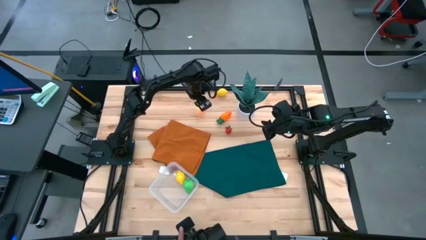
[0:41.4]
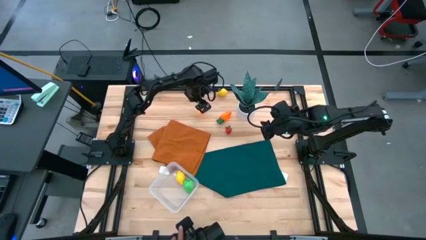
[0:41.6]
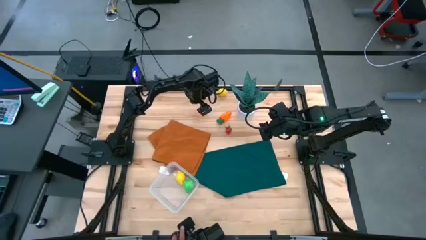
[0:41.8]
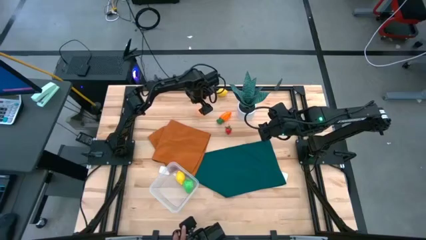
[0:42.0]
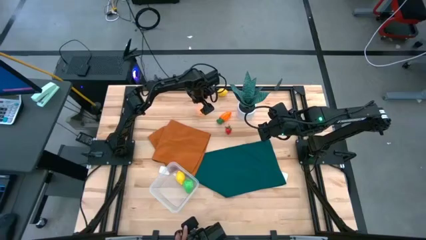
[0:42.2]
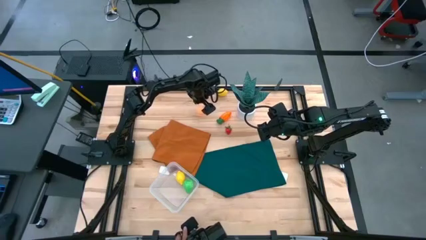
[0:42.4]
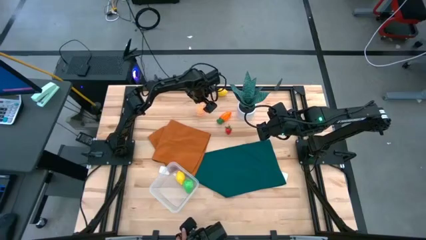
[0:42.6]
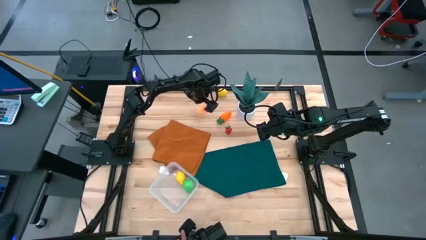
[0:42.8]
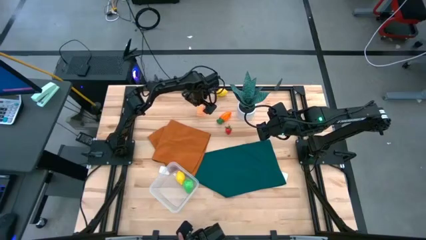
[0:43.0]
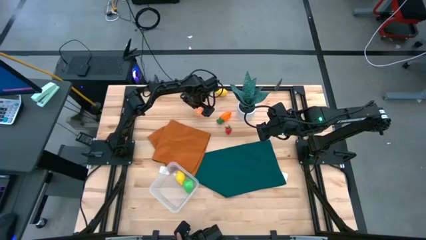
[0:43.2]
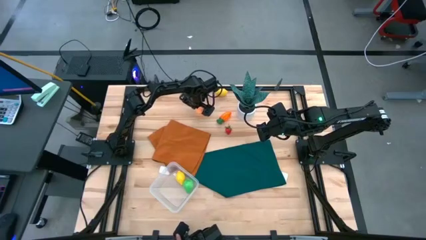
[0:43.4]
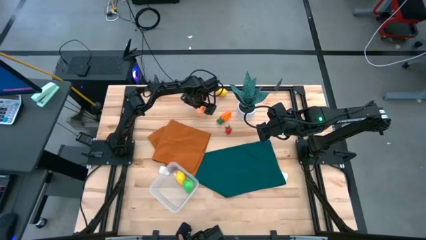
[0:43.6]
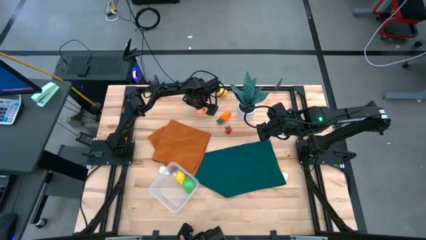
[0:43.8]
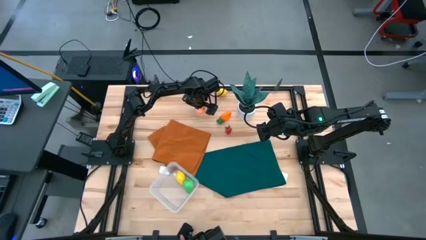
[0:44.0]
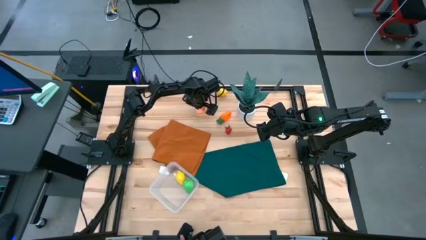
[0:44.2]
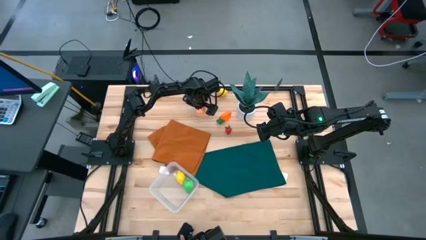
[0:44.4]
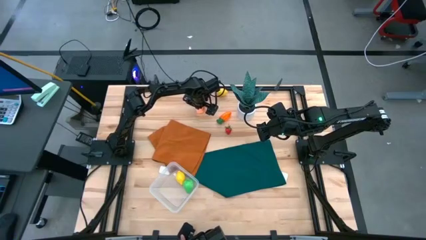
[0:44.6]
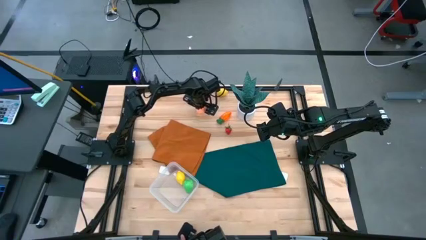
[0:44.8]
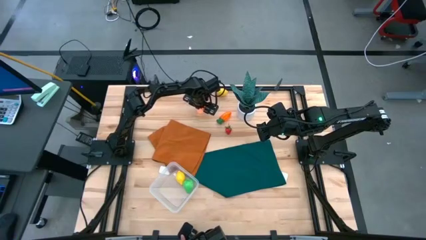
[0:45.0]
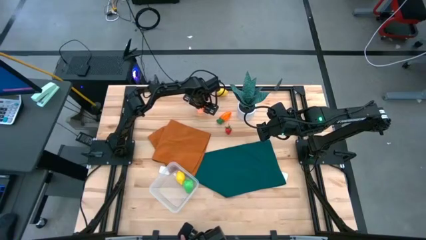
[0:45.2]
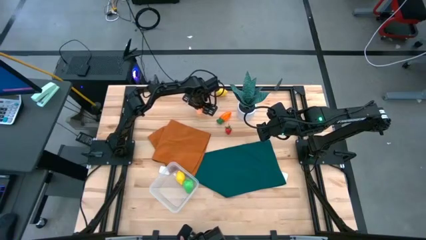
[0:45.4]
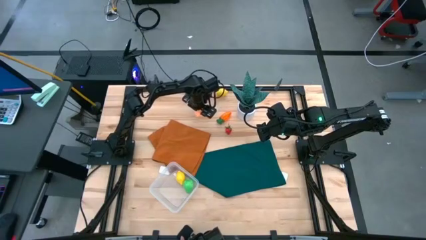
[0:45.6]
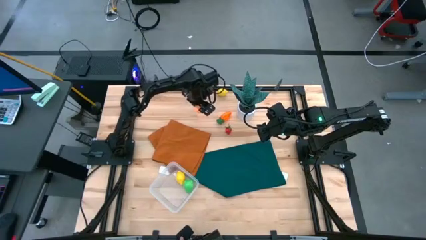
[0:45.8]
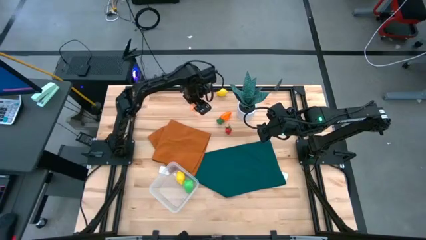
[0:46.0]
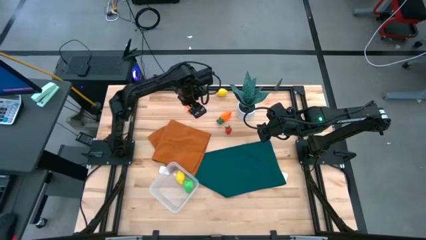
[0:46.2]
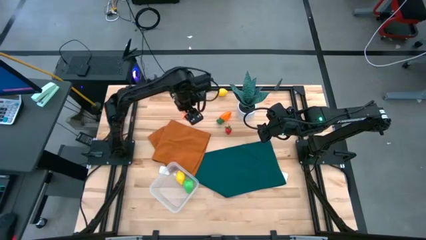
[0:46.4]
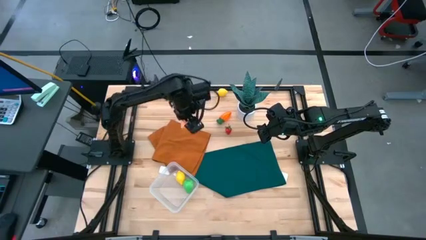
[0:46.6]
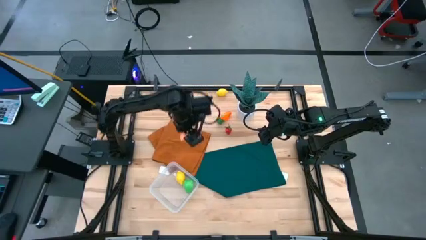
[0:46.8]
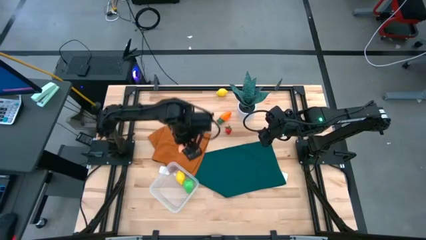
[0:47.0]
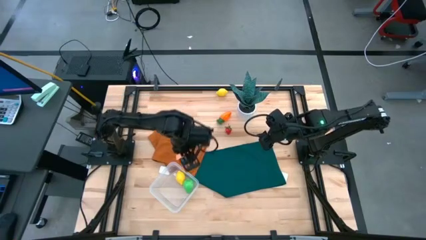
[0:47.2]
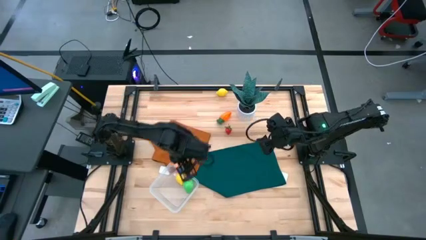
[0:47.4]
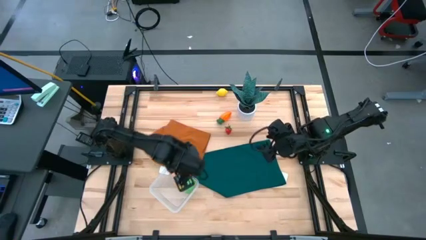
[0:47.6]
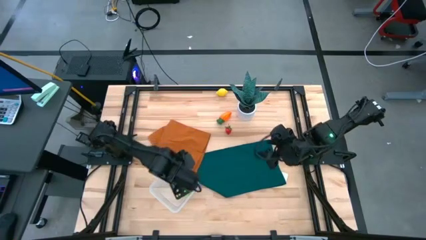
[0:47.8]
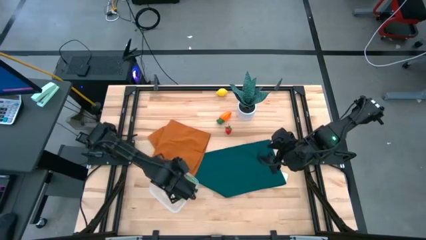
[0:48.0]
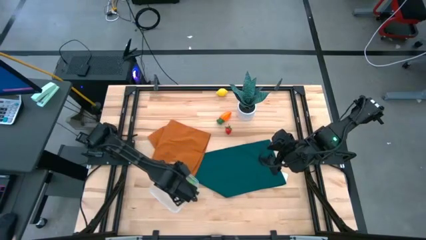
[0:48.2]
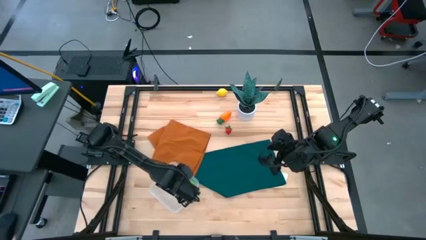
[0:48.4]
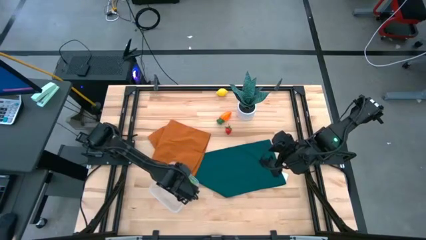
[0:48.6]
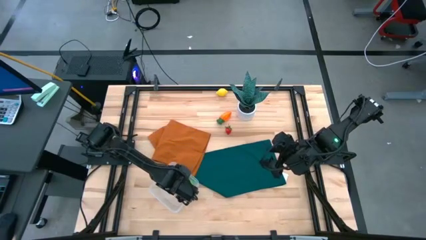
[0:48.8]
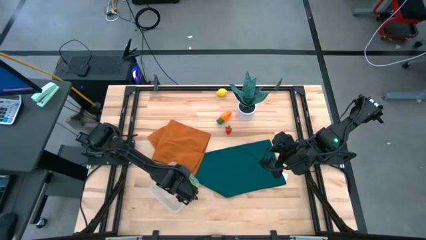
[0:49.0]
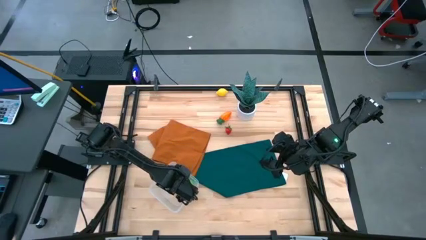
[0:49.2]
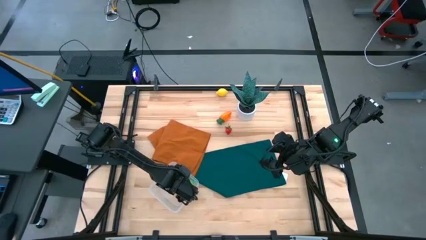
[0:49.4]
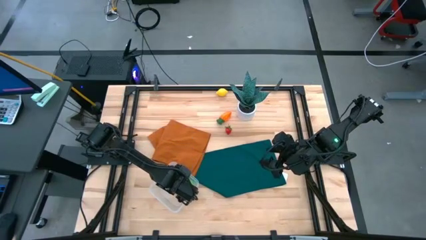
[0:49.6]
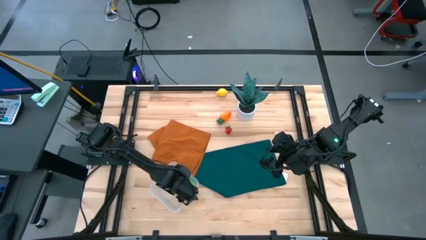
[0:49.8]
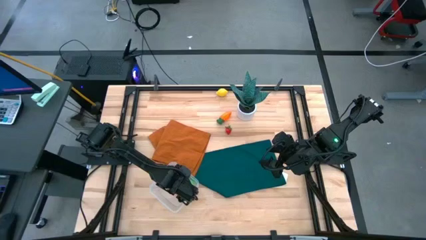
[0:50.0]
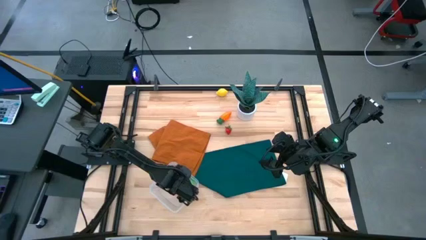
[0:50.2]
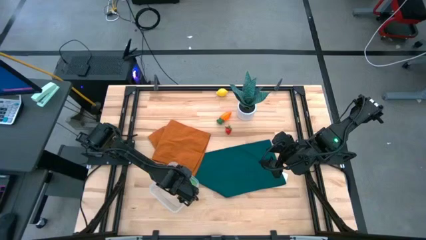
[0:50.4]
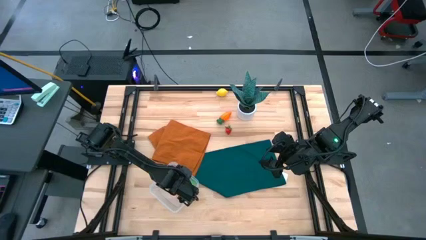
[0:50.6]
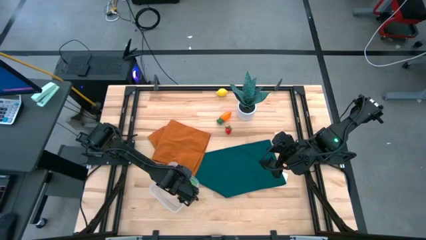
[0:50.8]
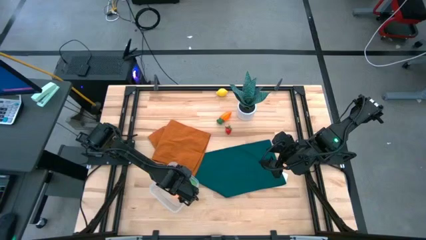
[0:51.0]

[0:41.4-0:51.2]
Task: Pick and placing Produce into tupperware
Put the peach into the transparent container
